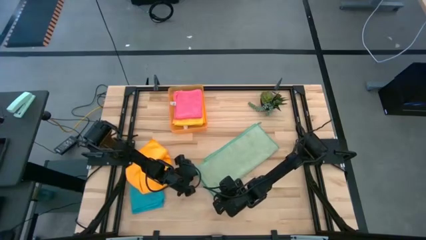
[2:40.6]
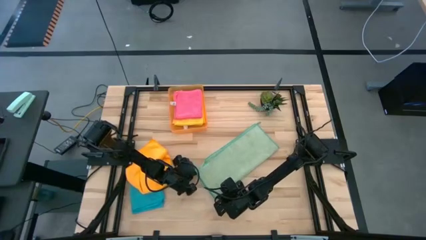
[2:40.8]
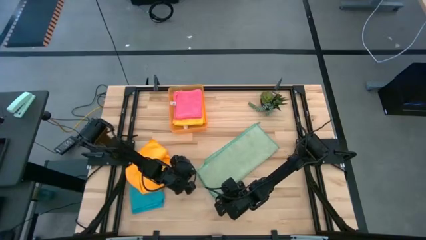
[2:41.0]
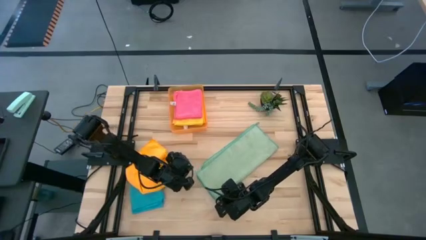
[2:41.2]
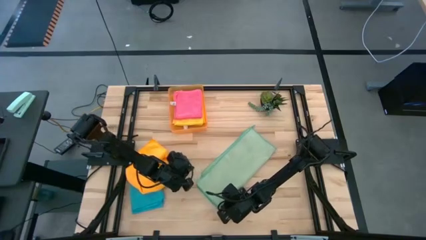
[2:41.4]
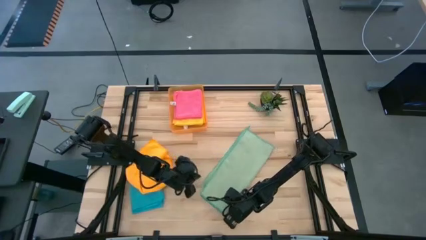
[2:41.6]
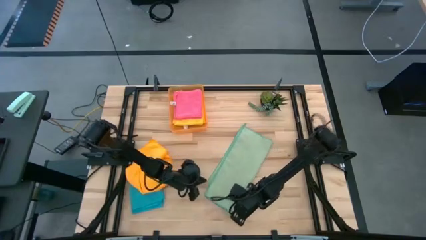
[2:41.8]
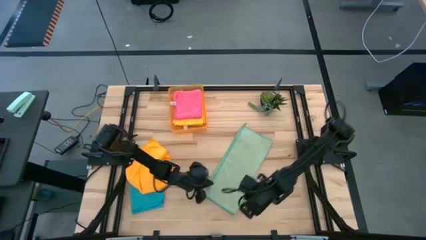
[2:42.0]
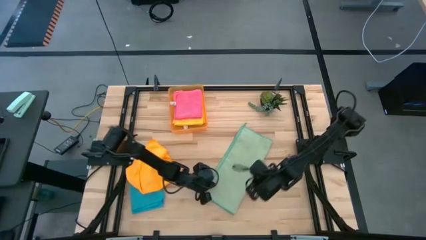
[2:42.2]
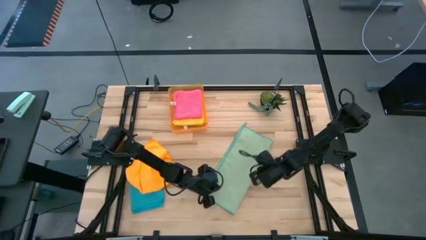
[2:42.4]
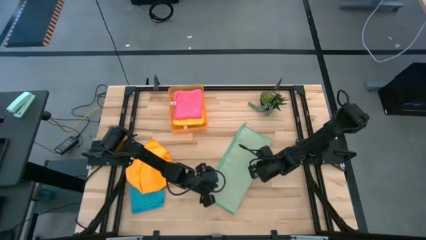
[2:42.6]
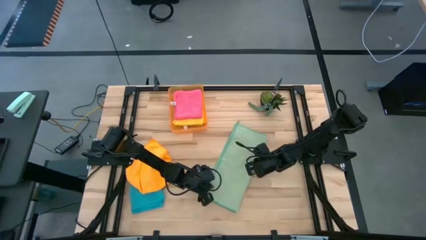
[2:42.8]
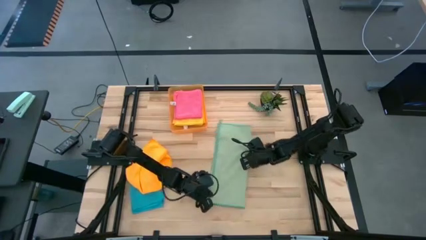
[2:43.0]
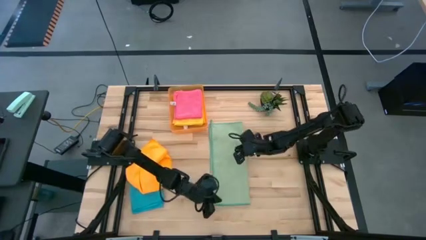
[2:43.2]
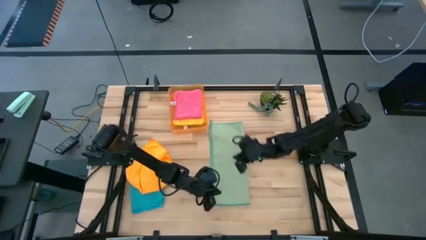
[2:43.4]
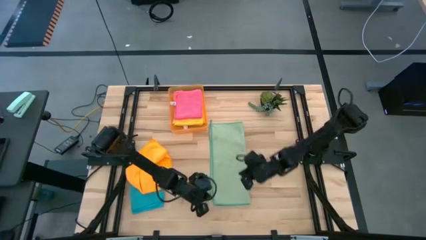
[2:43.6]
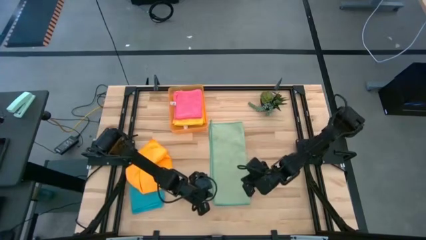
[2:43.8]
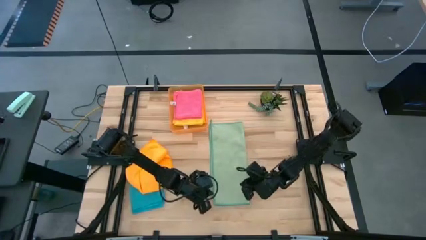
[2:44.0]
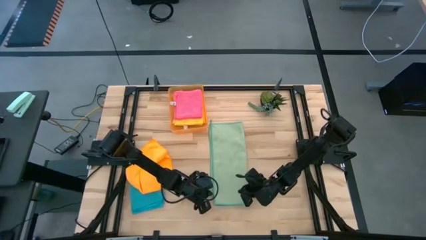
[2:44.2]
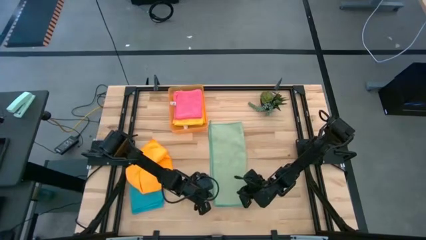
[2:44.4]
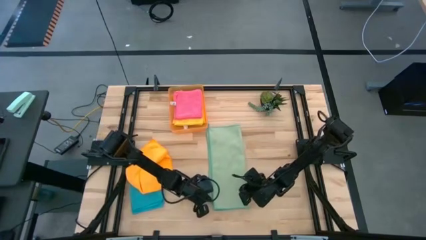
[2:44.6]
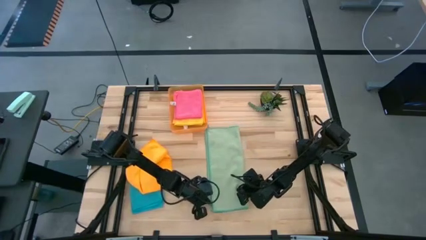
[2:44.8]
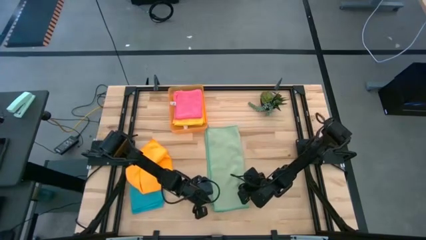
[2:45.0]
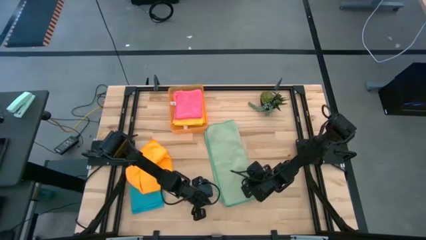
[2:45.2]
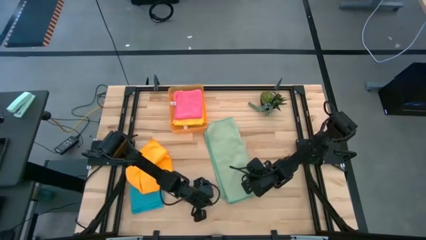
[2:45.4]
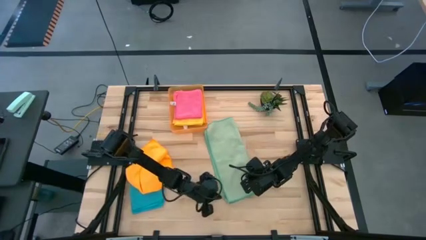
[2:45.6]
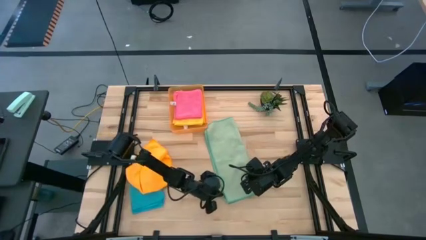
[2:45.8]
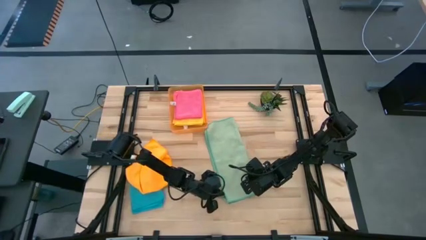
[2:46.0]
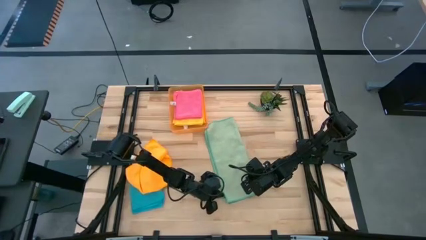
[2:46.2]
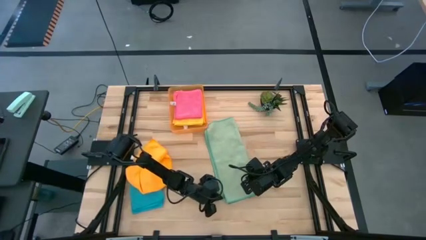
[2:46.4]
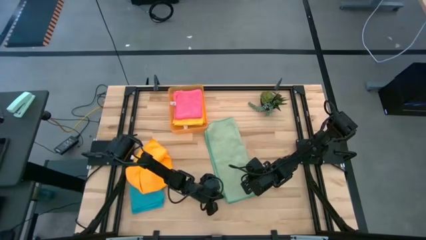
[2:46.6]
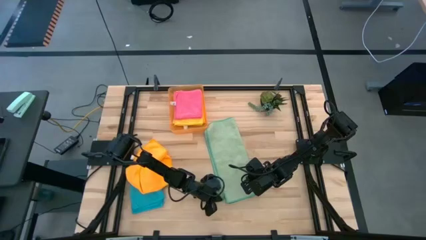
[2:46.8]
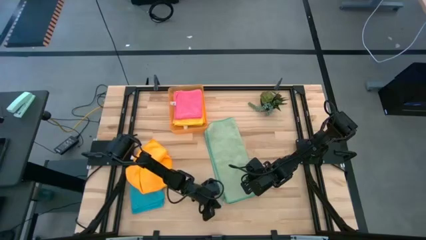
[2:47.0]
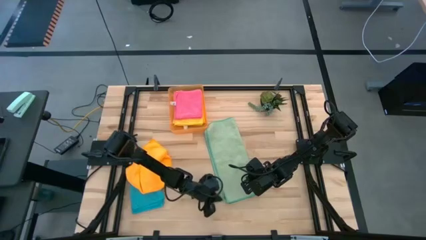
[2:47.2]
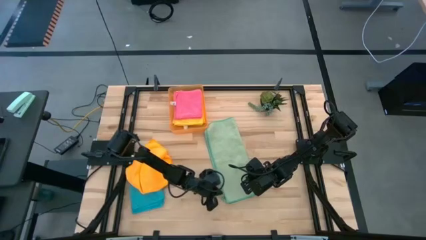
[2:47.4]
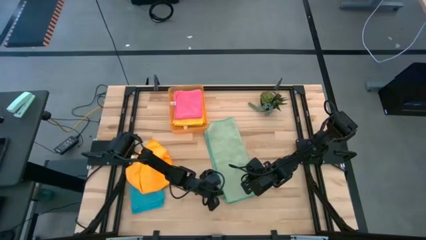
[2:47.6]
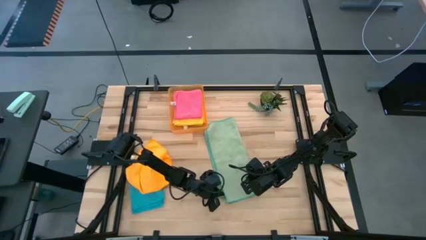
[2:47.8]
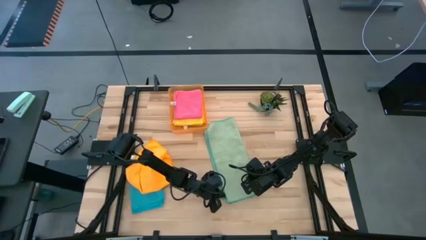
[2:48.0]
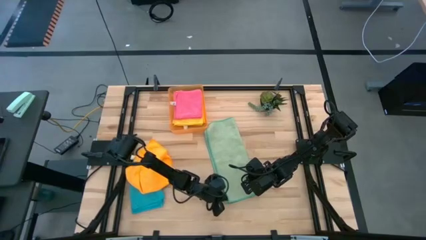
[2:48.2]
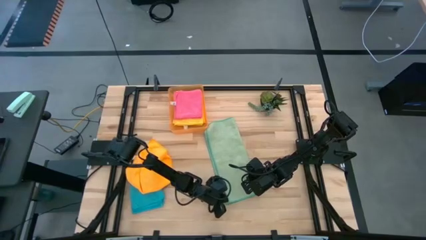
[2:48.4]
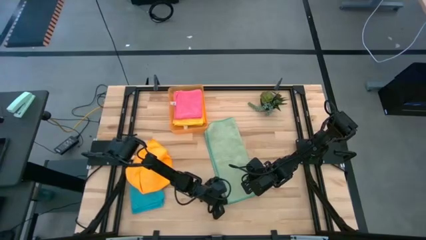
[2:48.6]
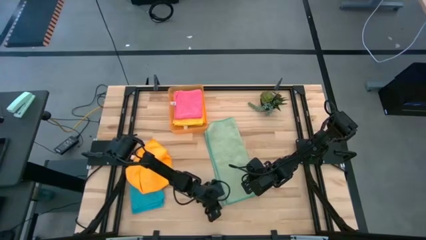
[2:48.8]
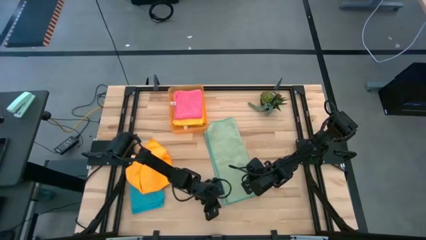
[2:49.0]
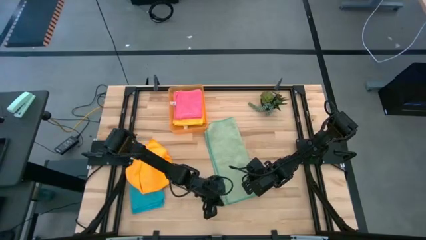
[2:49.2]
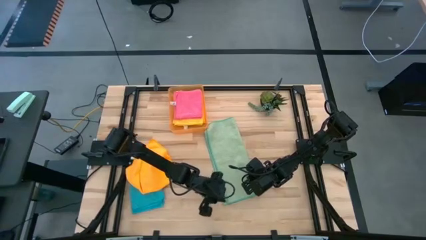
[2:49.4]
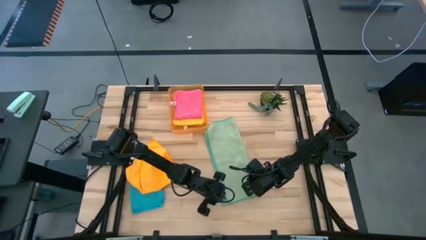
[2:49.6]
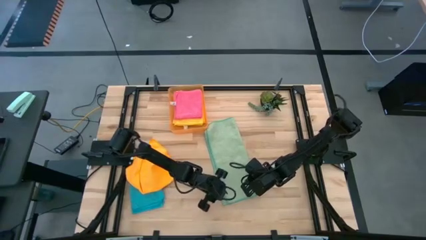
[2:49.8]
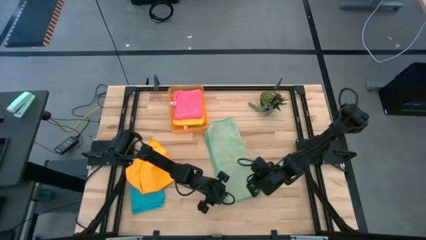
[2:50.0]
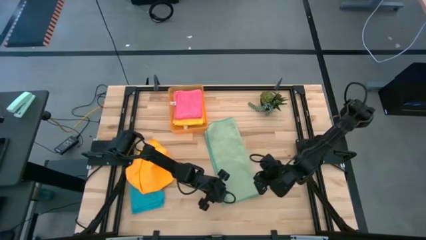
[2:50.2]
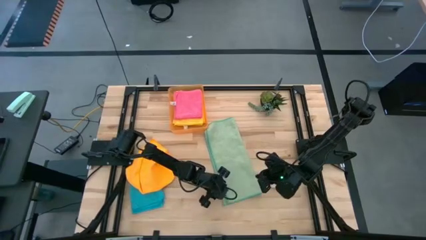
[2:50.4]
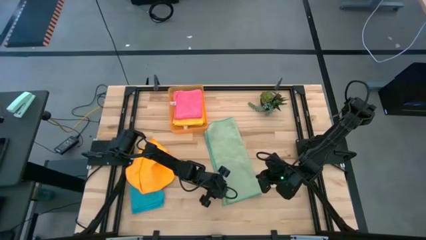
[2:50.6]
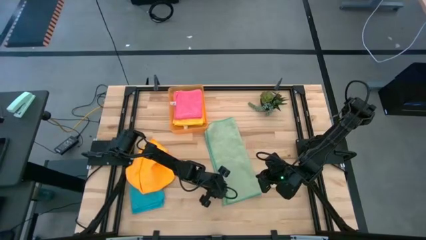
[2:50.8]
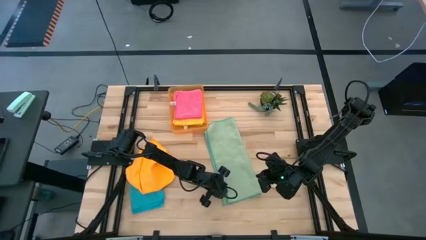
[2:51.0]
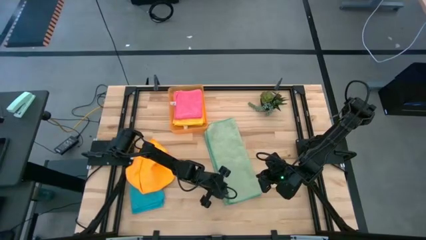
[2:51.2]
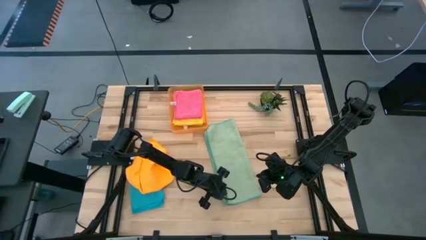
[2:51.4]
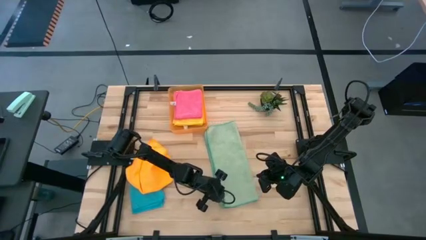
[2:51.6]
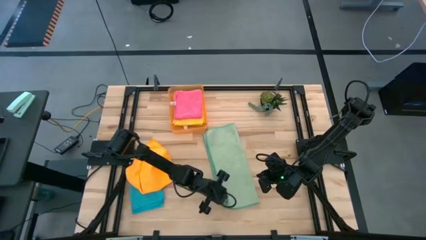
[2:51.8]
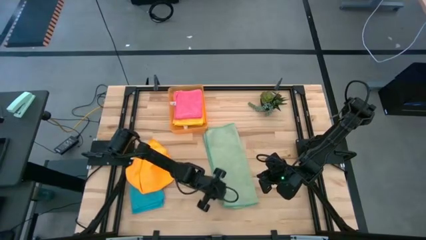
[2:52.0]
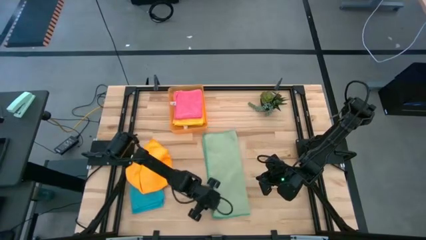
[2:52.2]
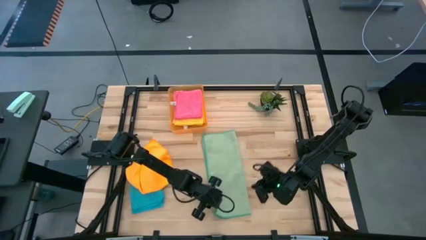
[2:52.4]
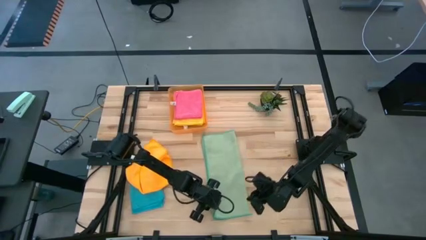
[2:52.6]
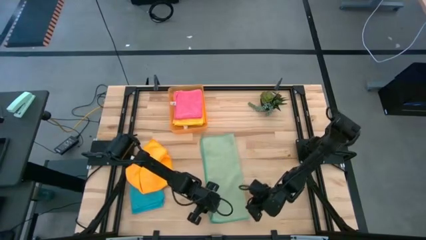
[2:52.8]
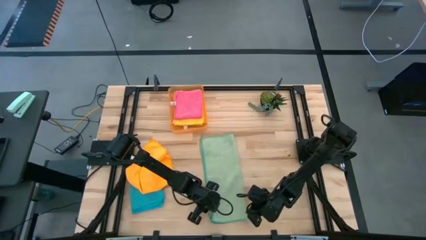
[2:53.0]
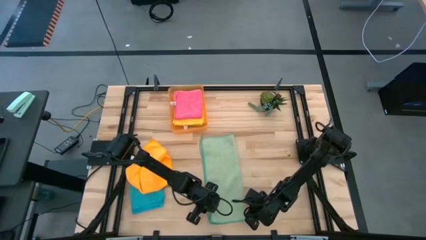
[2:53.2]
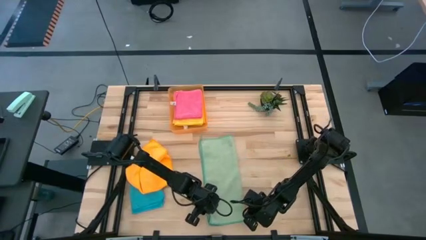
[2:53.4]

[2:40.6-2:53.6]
Task: Fold microfiber towels
Fold the green microfiber cloth
